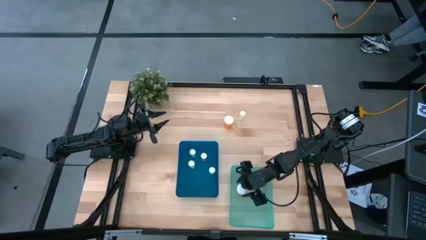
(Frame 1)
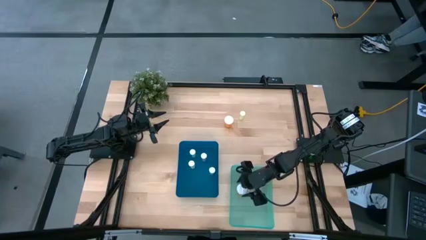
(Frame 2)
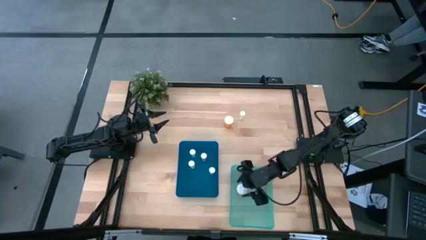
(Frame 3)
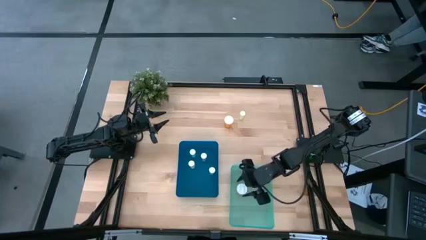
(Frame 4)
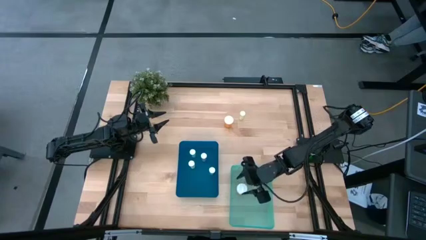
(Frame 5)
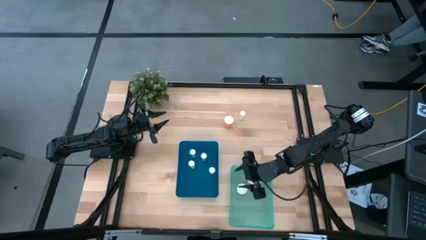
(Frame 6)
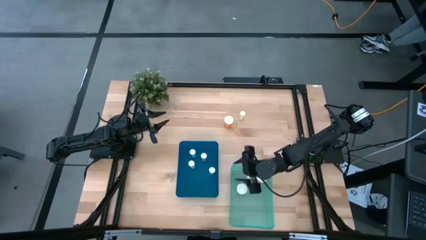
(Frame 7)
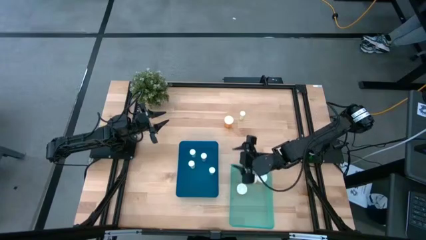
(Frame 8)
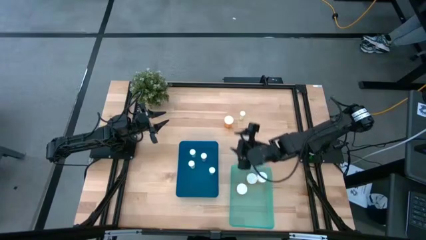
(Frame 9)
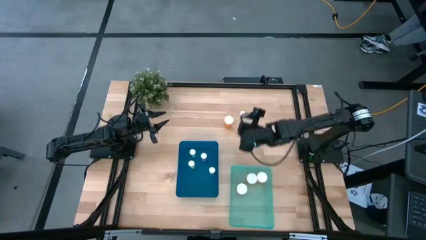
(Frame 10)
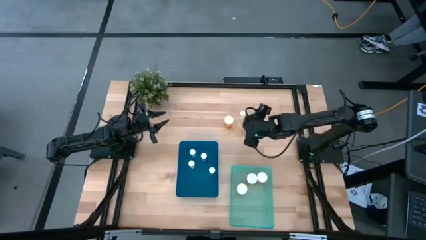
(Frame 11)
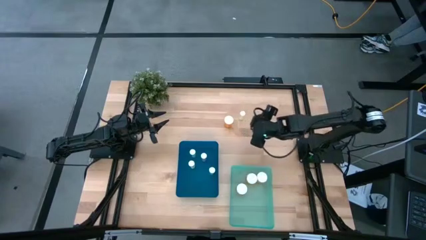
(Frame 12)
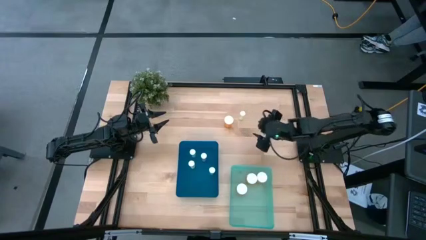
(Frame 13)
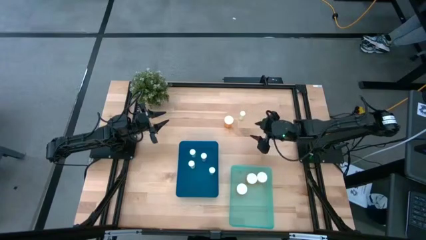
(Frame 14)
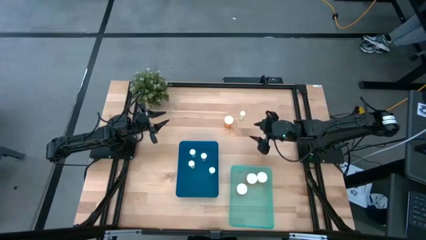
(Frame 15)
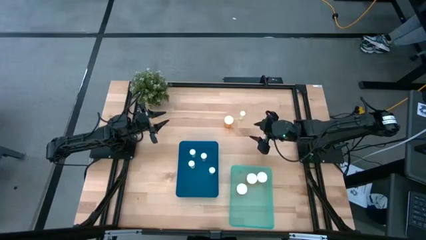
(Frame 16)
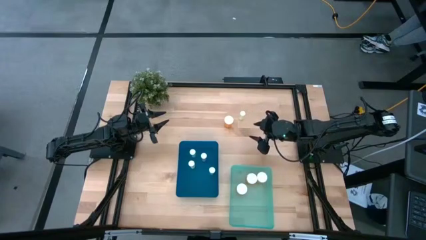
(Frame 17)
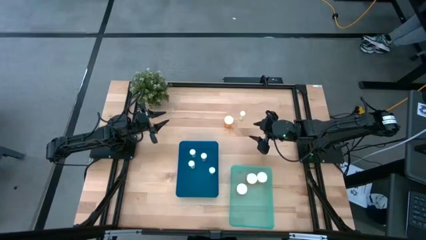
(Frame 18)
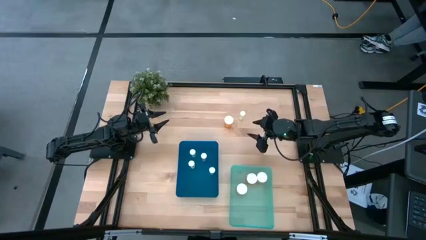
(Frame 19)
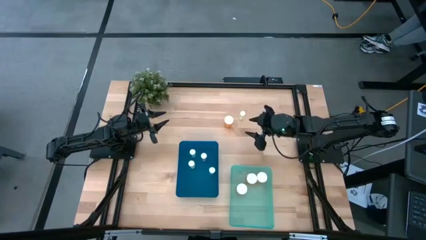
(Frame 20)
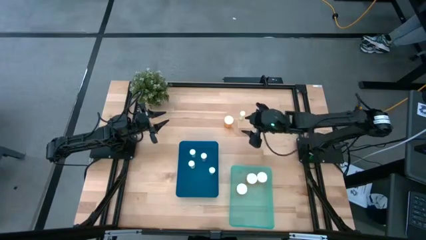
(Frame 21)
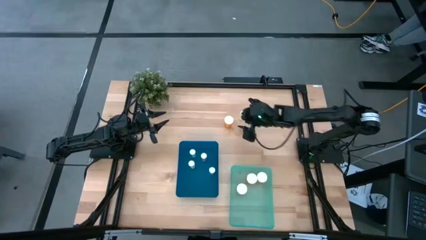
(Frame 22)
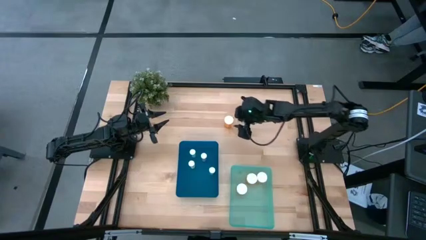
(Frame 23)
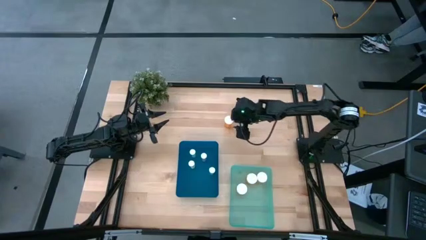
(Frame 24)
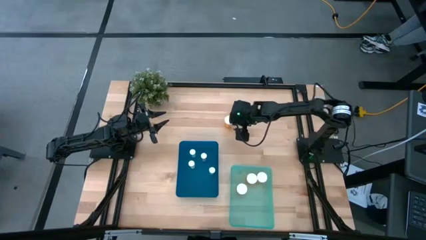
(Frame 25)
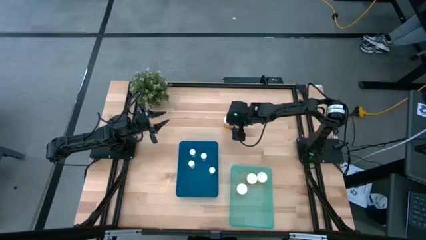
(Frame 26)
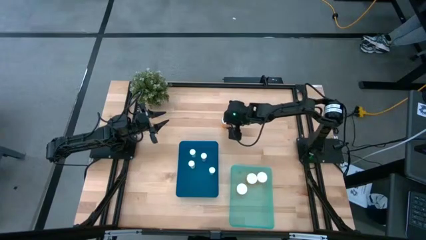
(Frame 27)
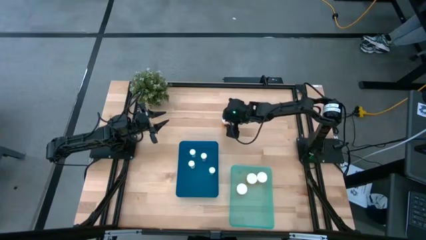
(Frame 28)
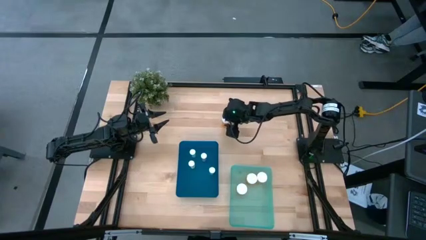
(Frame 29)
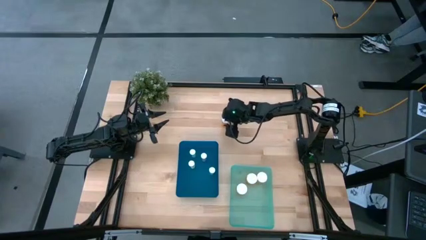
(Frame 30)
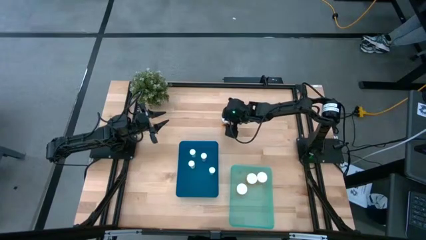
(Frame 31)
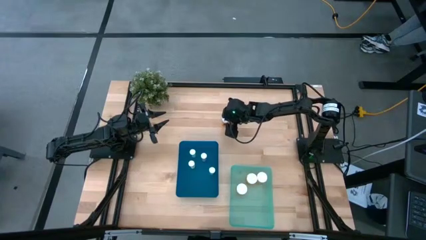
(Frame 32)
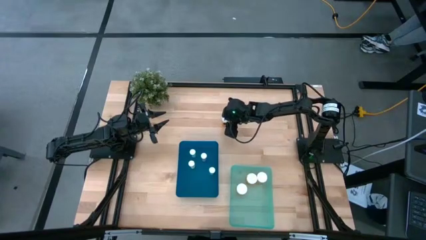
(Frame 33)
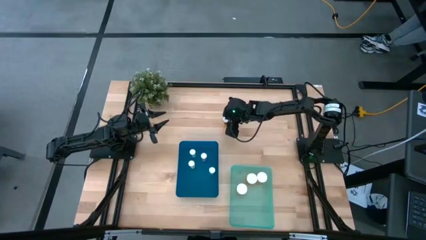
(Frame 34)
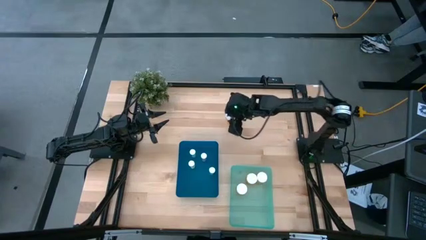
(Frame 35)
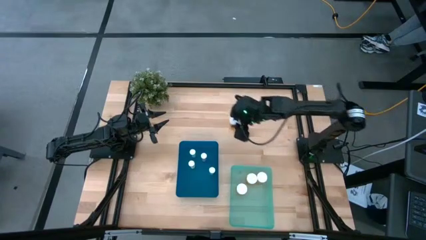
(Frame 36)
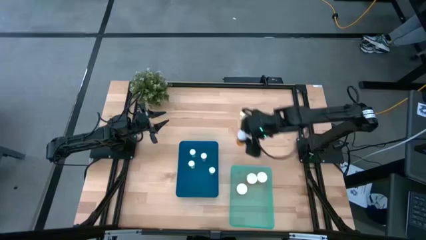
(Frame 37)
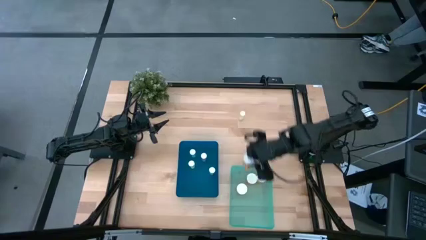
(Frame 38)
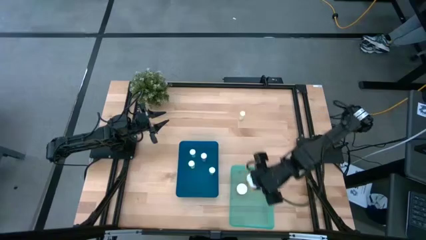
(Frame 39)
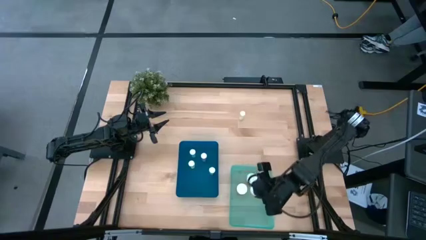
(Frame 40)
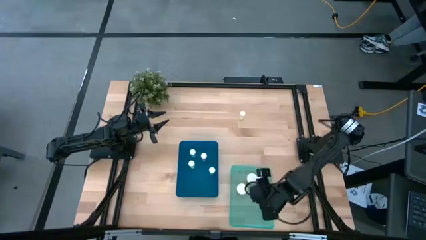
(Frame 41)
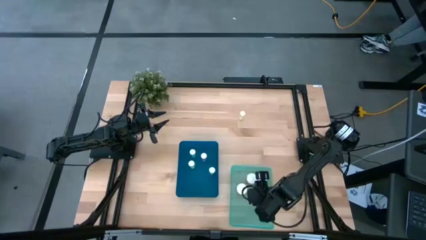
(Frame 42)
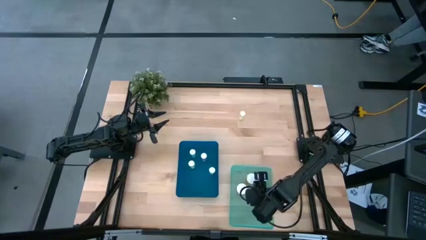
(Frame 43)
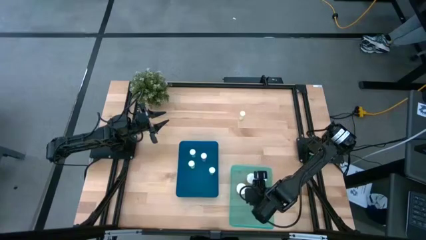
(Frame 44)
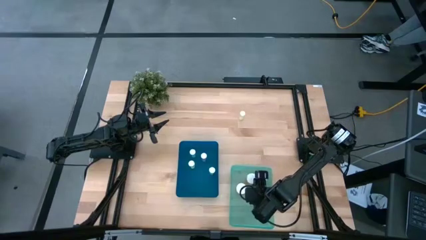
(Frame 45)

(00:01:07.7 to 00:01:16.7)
Task: Pick and place medicine bottles into bin by pill shape (circle, oval)
Put the orange pill bottle into the light blue bin

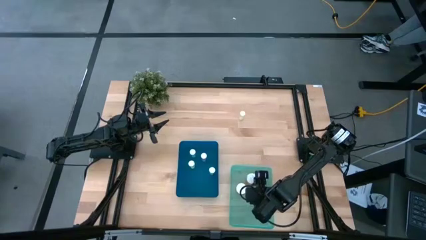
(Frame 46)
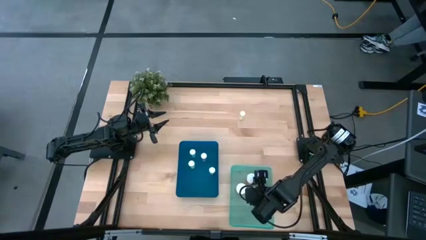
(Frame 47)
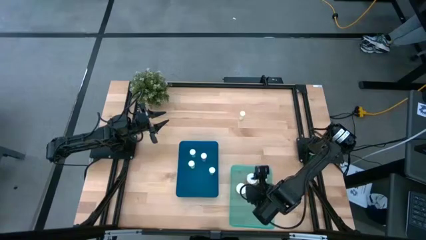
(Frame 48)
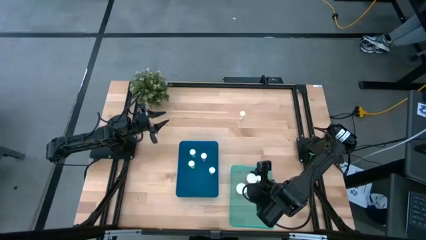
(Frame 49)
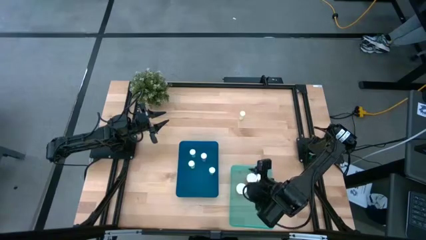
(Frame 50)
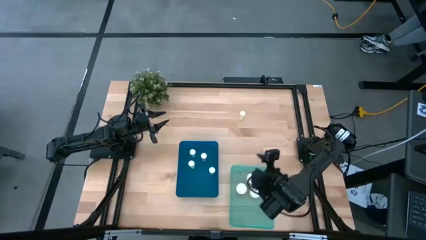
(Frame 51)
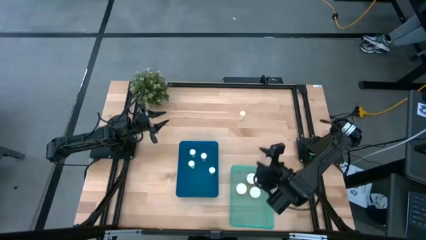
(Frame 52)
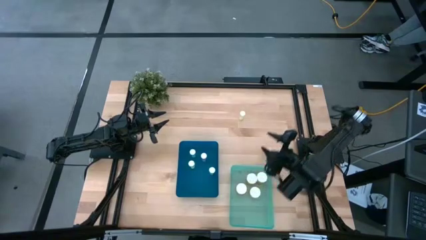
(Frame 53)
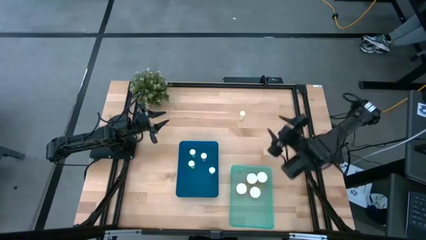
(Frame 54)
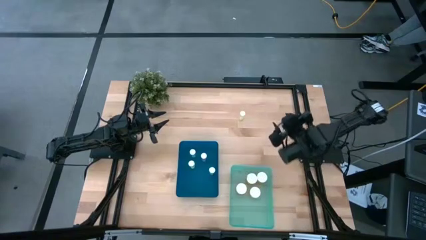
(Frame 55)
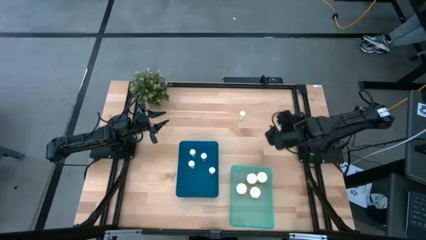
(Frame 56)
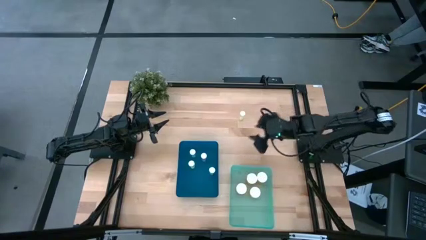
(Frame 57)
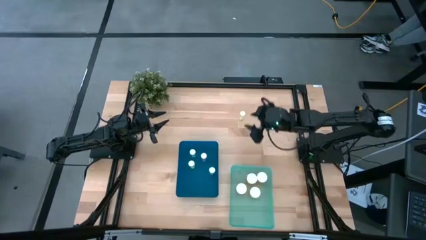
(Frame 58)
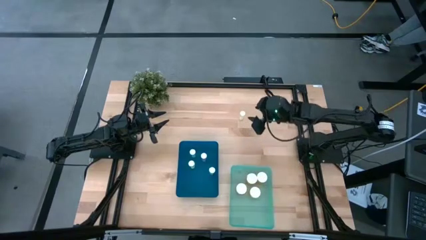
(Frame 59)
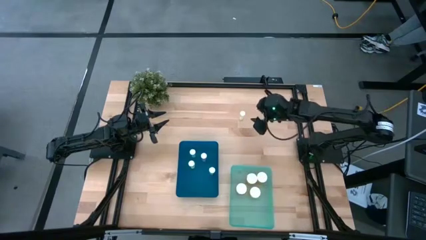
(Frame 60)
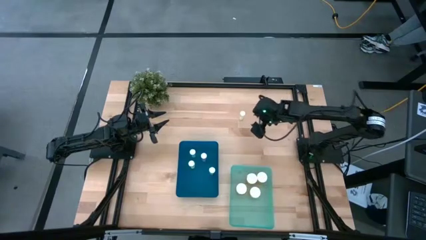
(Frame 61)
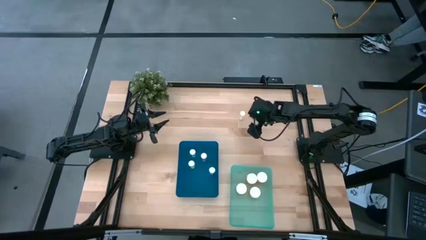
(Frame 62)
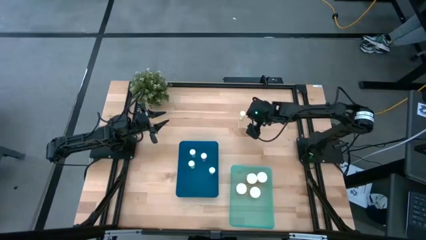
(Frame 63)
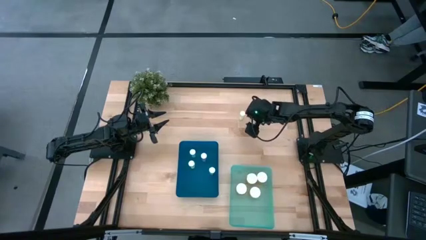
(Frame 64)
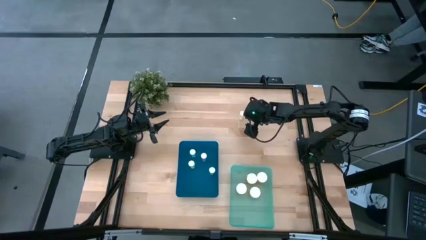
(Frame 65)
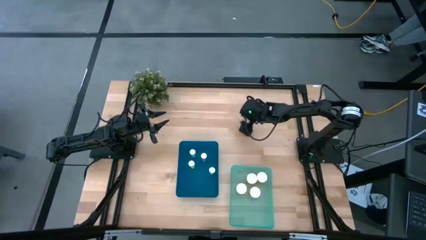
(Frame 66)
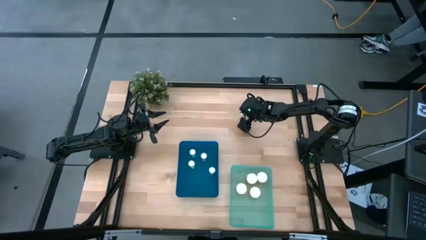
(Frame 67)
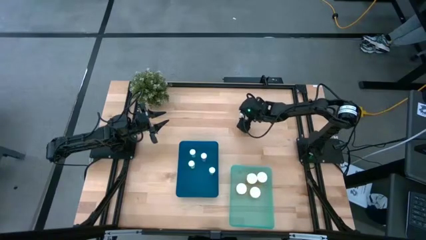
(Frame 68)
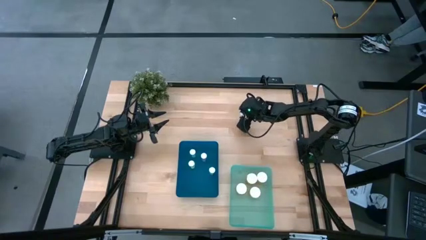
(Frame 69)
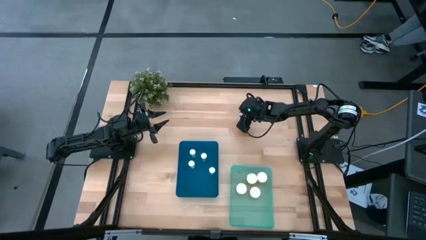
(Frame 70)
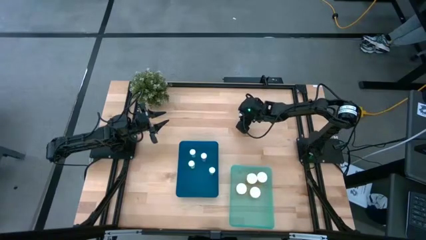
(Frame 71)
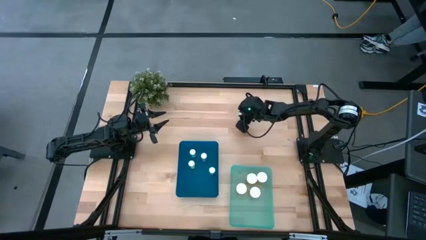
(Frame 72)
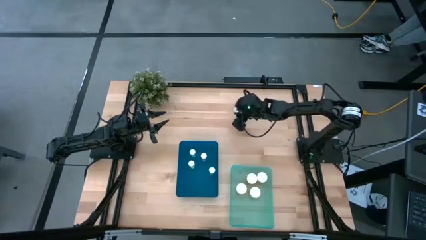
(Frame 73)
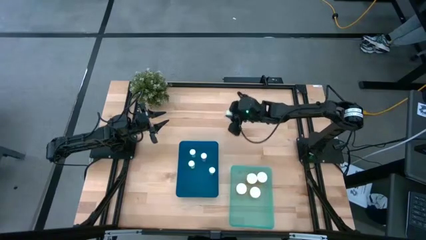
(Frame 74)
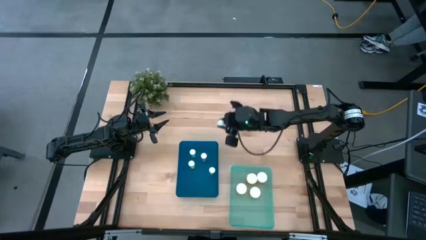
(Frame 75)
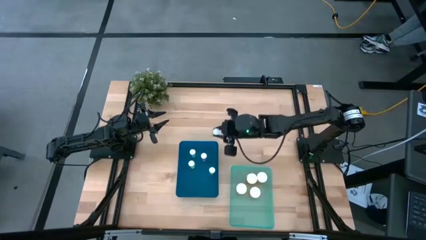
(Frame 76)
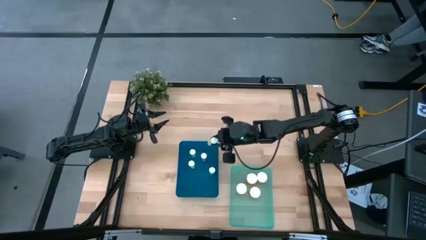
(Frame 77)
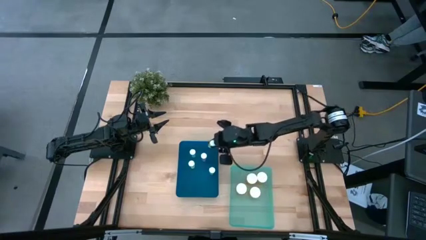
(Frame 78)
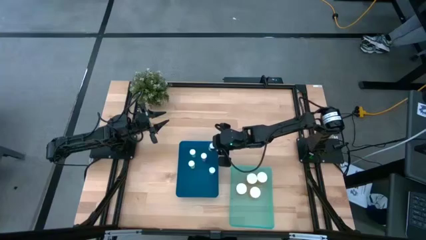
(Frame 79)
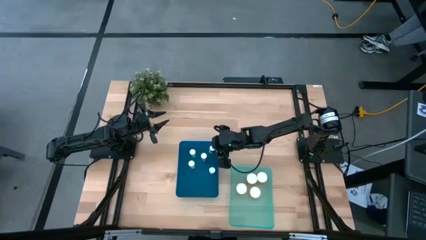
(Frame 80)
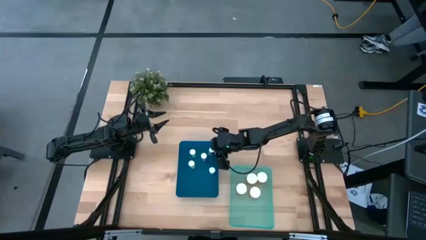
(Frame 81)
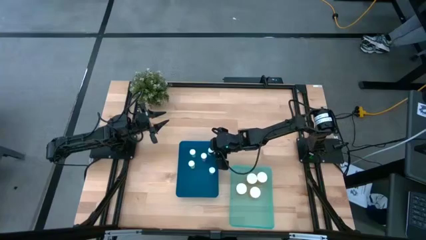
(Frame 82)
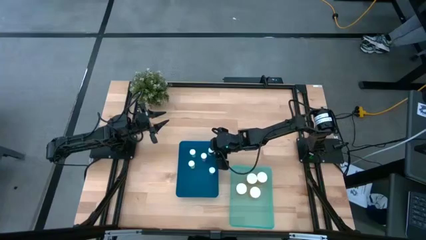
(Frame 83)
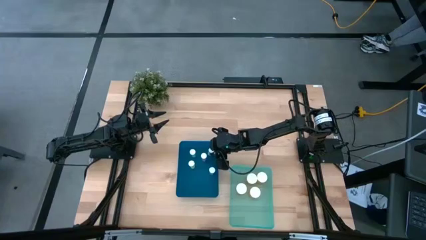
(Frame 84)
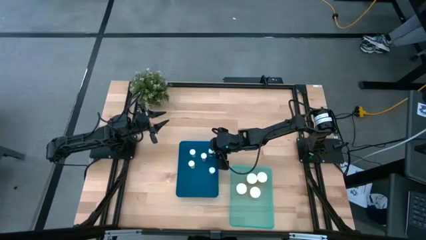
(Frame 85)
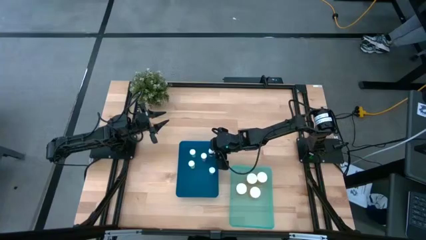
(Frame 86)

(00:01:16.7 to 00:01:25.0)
Put the yellow pill bottle into the blue bin
